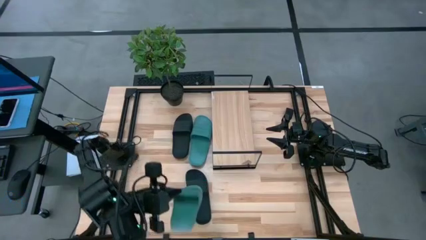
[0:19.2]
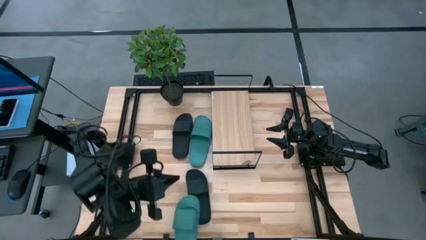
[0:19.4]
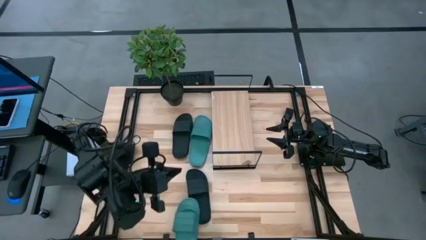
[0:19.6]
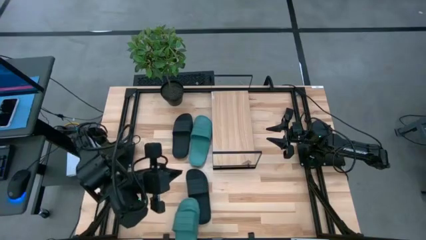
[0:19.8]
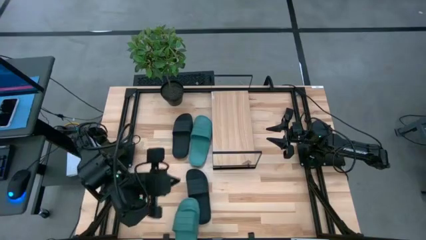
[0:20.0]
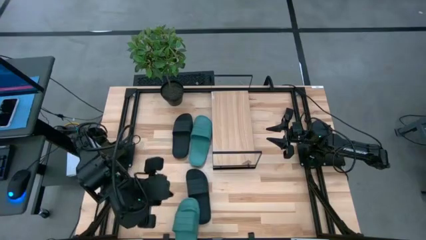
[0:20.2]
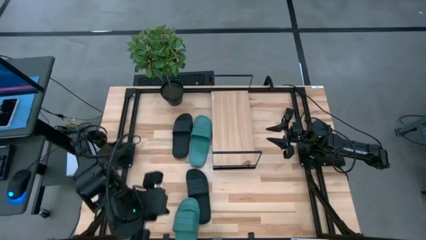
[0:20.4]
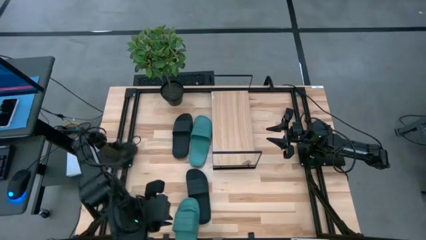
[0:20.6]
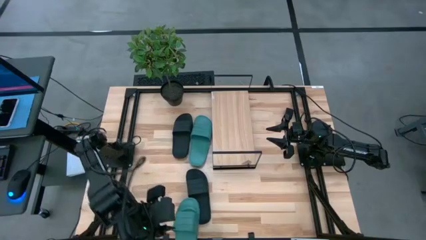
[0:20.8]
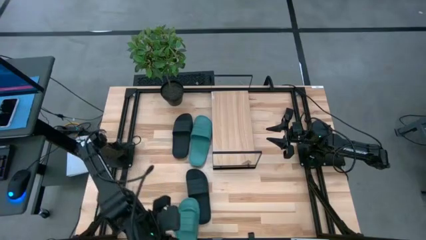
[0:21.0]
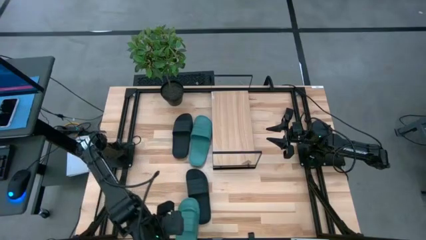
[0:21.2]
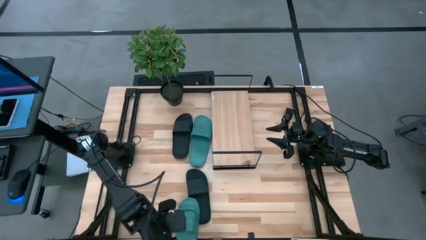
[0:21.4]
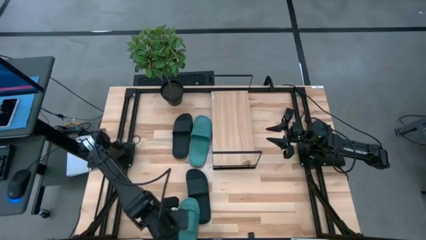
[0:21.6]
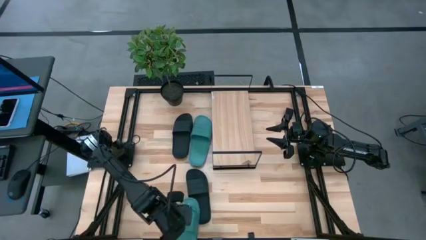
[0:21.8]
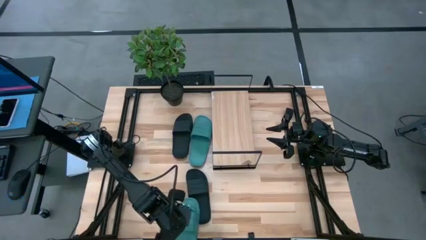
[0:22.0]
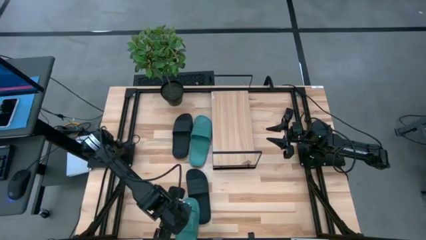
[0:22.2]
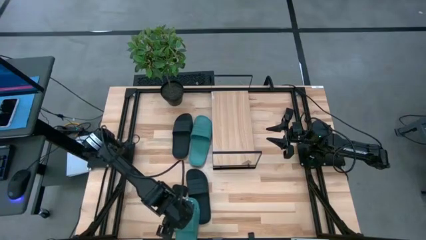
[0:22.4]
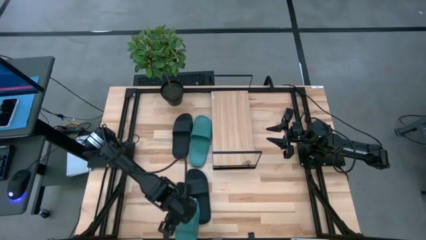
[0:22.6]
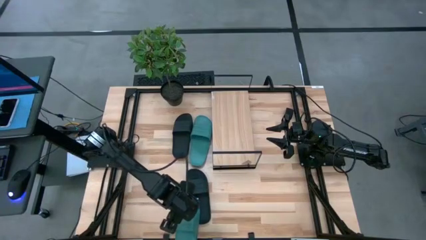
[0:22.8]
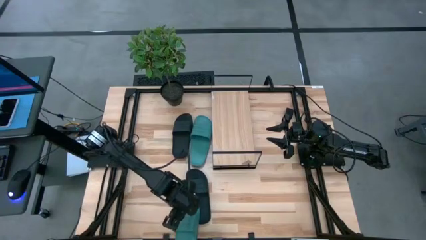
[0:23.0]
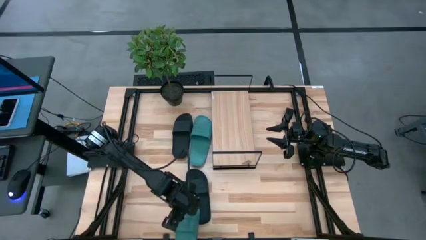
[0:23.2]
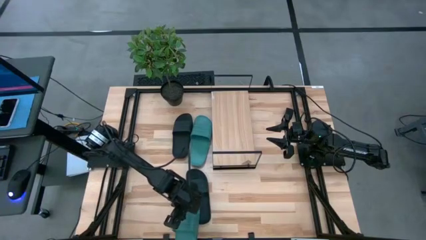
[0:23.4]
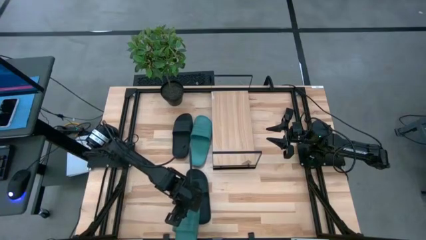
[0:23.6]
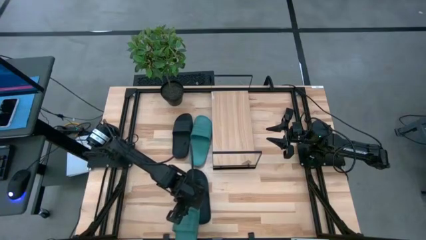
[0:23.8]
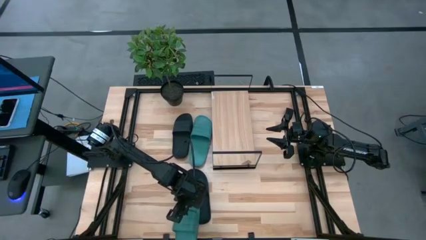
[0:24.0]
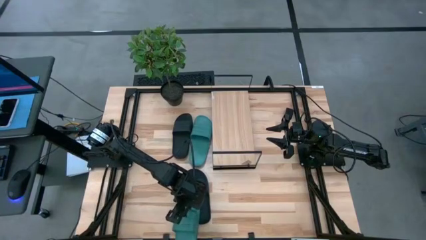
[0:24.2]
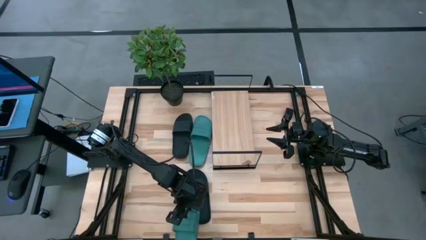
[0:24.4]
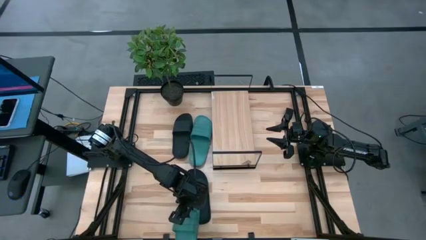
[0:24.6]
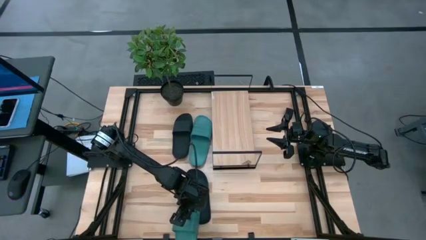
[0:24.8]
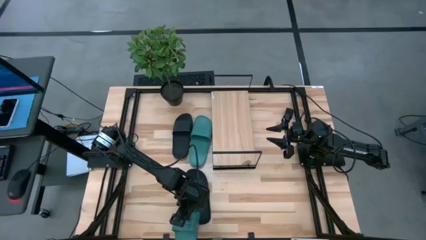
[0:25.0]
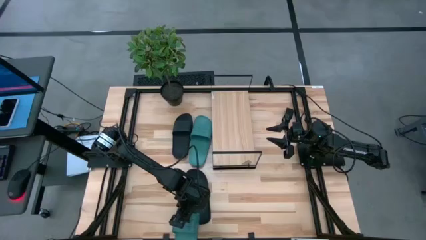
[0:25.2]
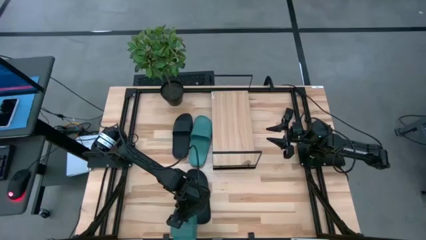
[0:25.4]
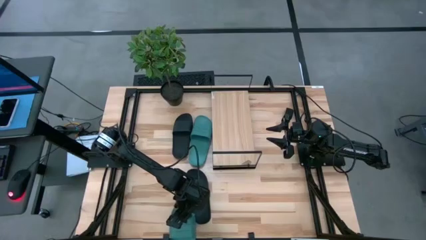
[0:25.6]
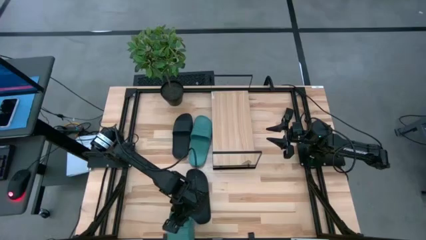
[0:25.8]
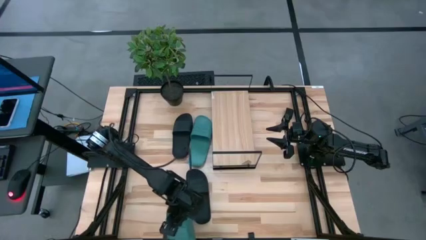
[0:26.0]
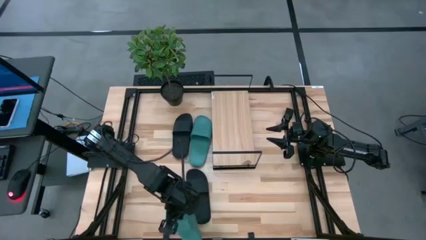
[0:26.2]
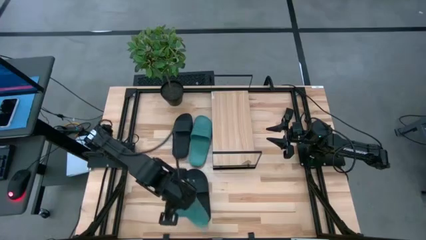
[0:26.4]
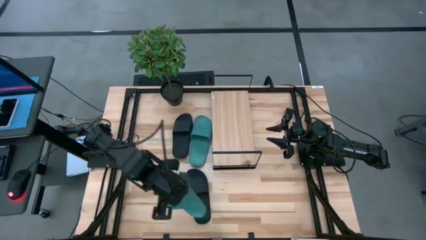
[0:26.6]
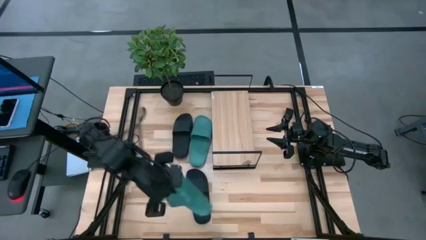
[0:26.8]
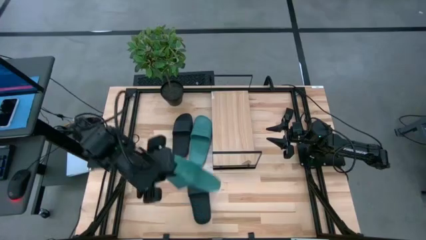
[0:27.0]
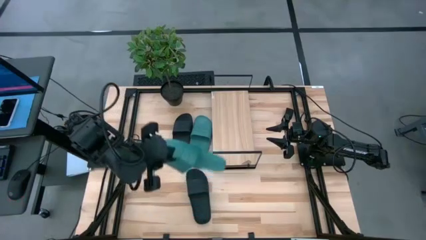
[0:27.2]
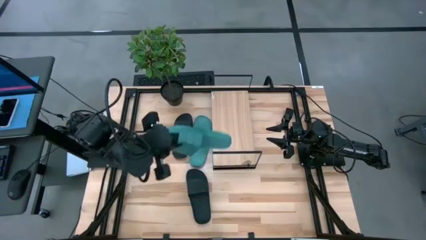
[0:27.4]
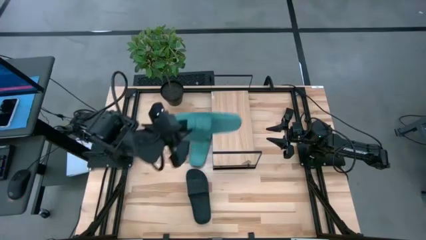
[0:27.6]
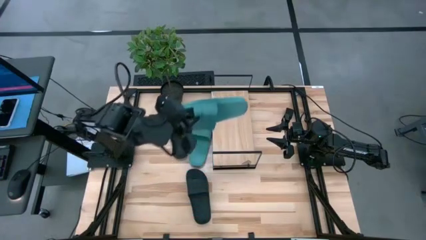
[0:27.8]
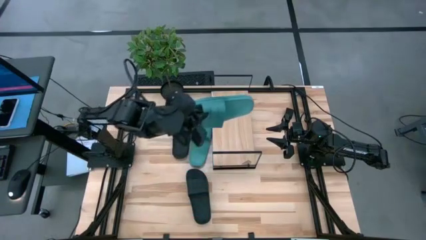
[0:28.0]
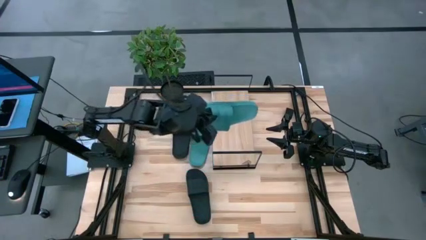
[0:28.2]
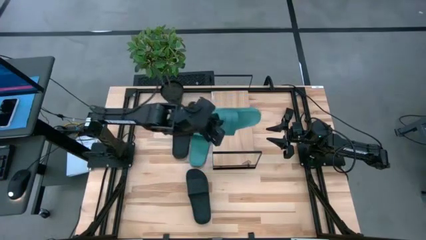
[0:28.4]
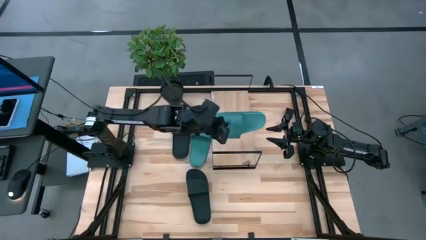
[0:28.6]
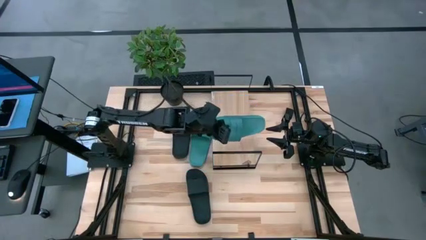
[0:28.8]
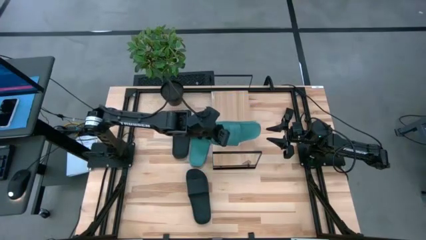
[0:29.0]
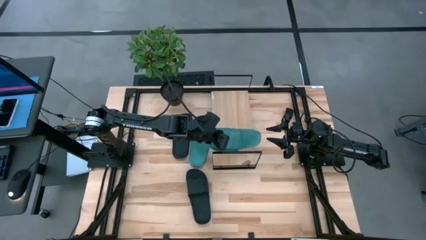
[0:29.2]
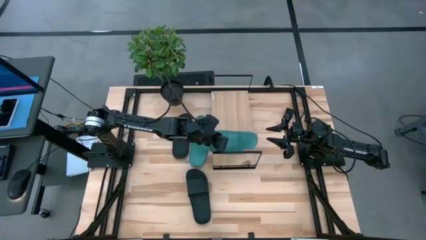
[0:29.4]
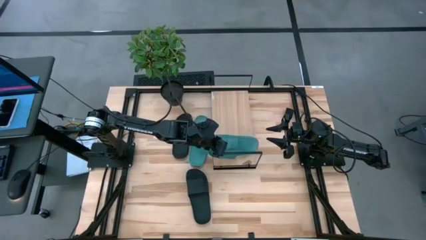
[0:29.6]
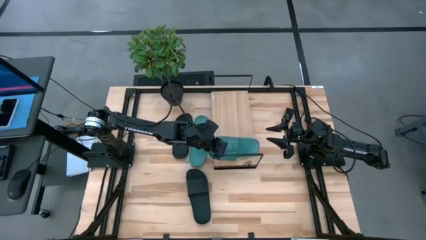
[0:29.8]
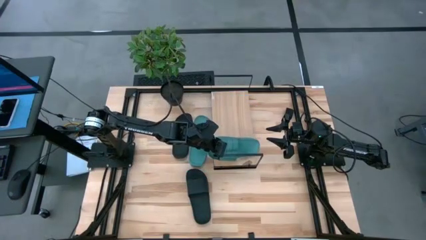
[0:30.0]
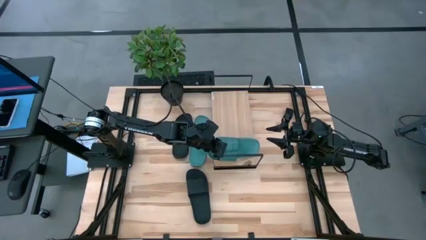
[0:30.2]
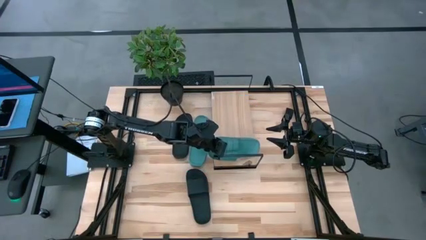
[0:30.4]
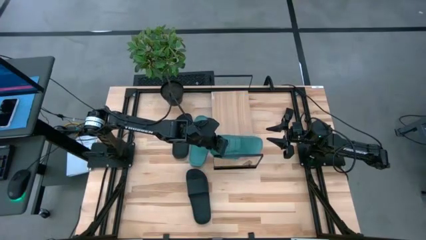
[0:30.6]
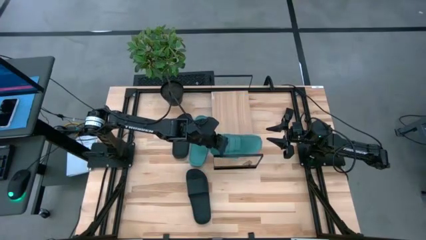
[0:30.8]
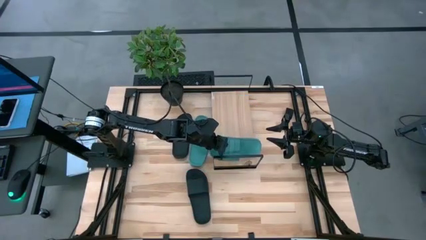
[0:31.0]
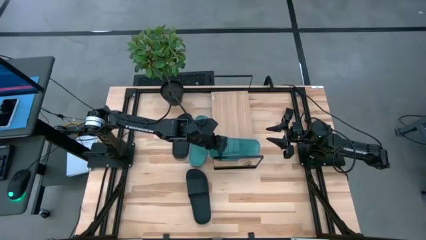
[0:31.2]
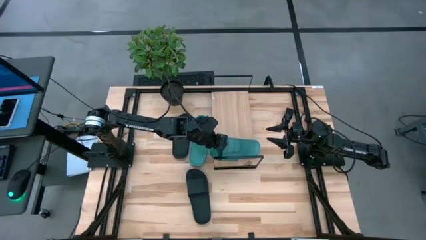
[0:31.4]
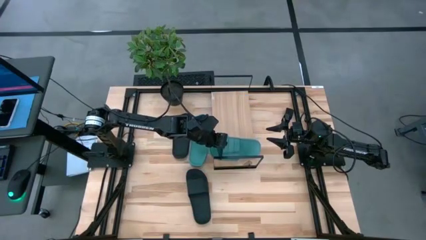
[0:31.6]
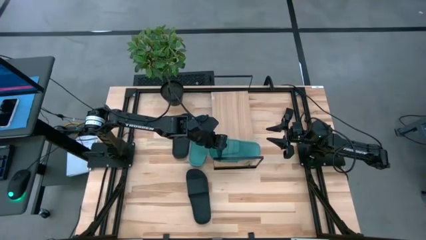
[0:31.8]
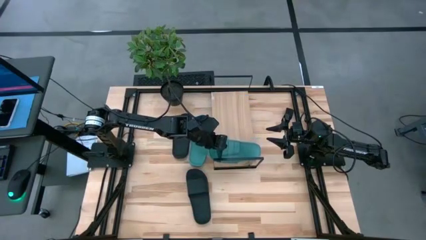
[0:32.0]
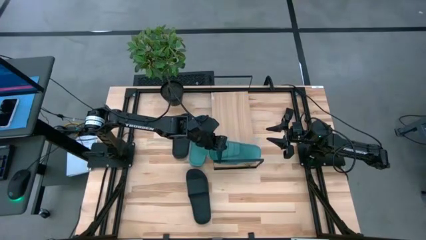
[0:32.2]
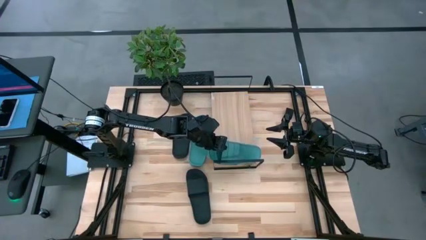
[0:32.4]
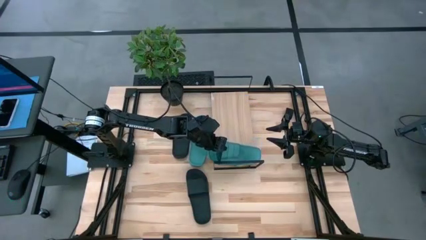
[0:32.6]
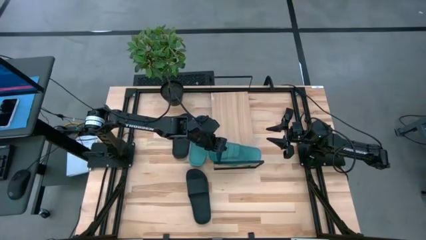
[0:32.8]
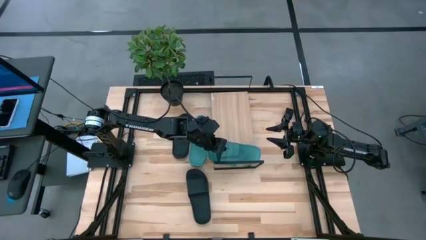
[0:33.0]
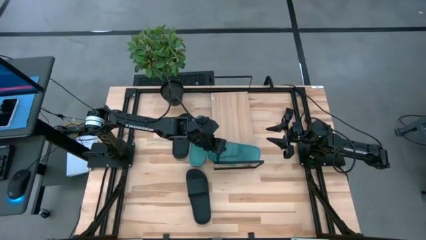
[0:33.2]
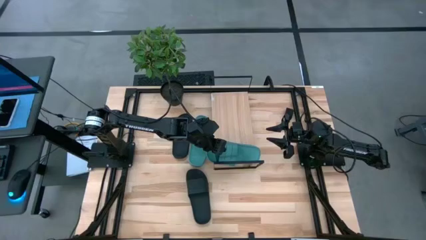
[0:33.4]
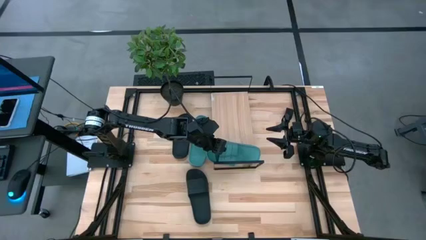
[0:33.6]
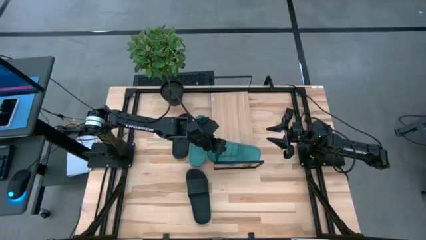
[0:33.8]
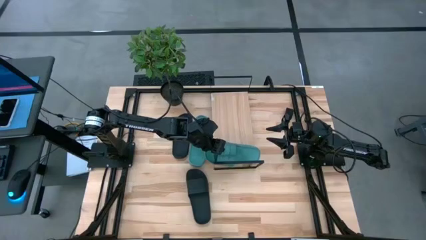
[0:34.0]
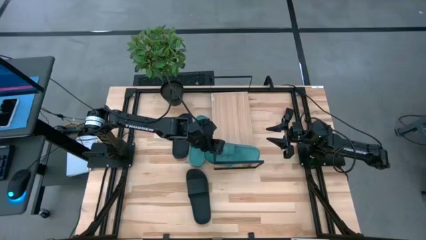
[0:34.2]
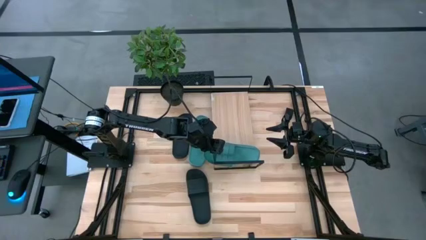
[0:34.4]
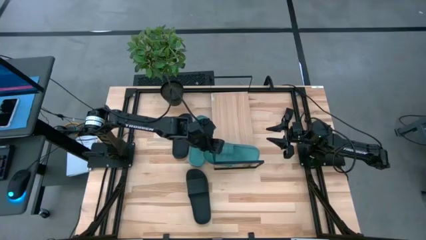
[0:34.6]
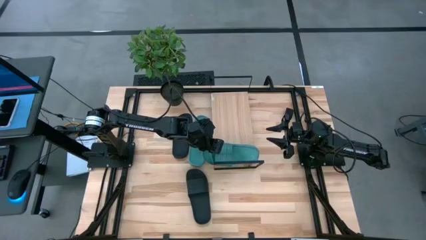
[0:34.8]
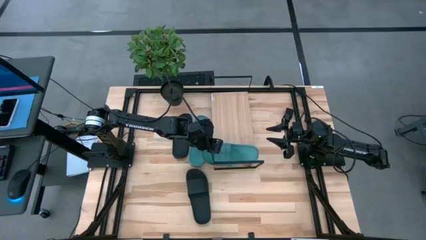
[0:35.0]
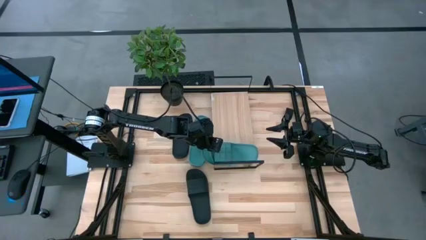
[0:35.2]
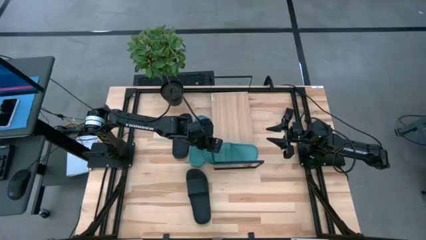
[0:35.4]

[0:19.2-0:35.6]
Task: Pick and place slides into the shelf
Put the bottom green slide on the shelf
